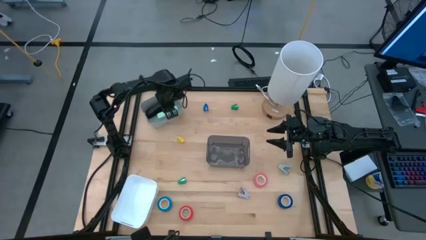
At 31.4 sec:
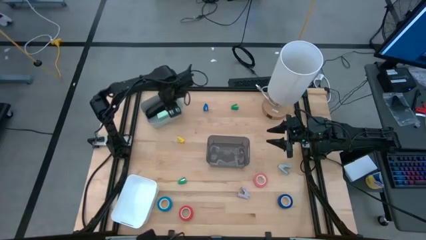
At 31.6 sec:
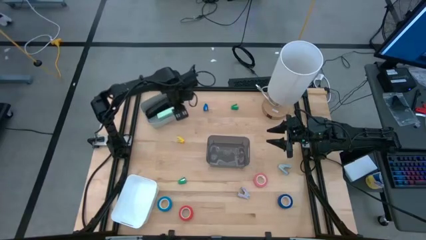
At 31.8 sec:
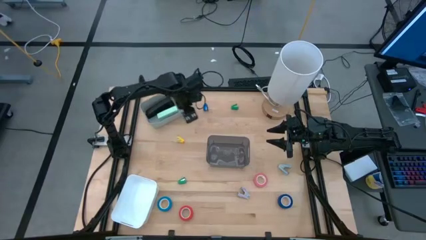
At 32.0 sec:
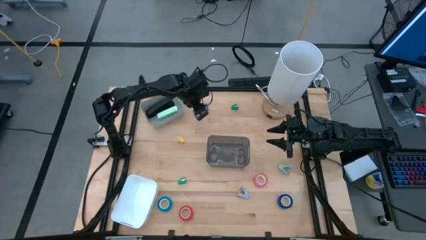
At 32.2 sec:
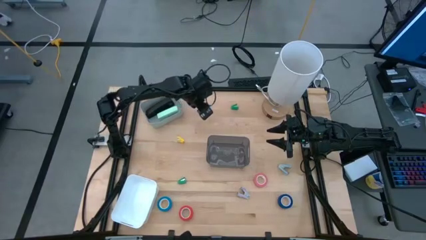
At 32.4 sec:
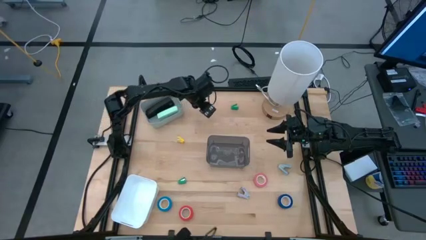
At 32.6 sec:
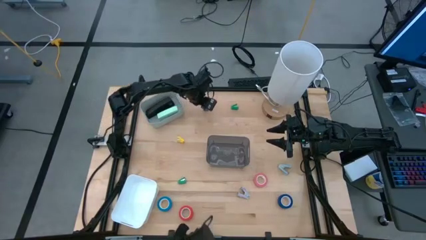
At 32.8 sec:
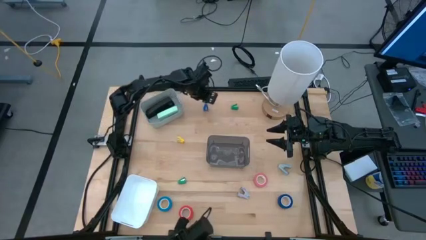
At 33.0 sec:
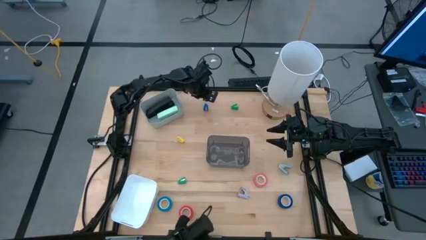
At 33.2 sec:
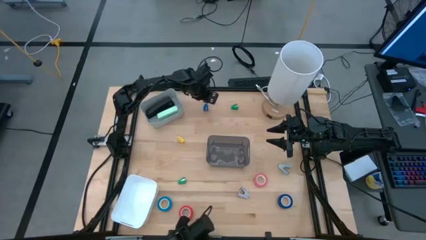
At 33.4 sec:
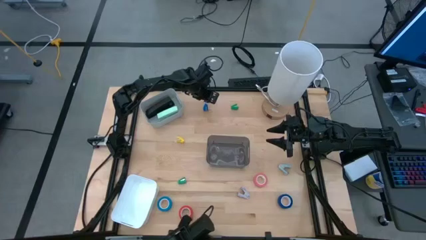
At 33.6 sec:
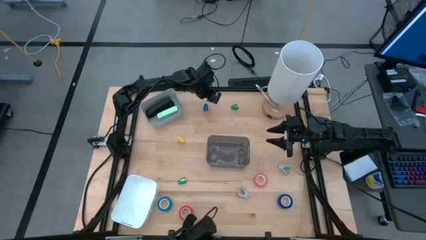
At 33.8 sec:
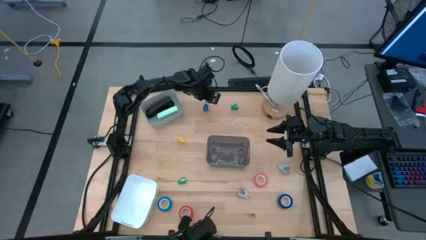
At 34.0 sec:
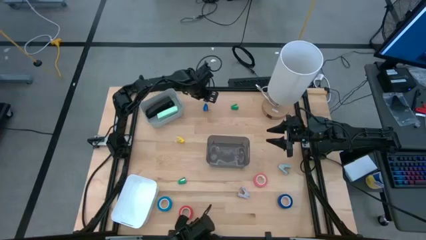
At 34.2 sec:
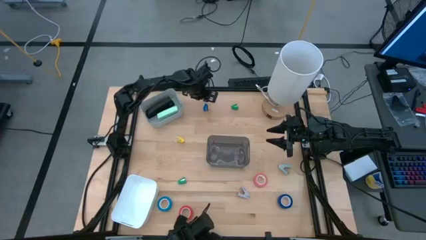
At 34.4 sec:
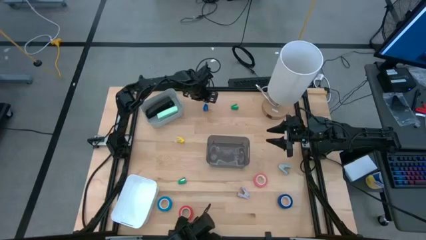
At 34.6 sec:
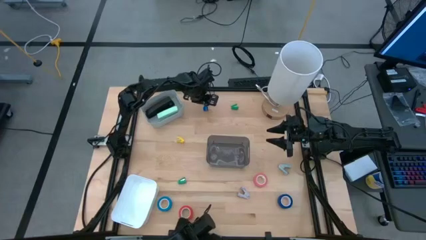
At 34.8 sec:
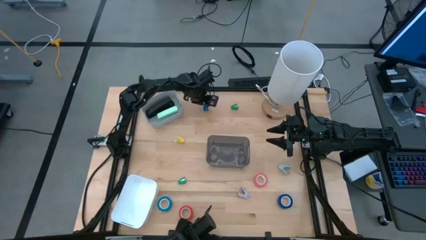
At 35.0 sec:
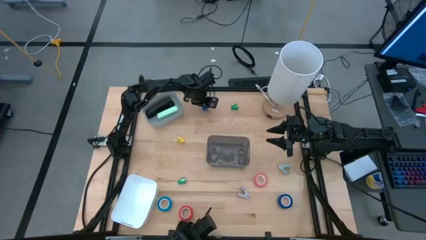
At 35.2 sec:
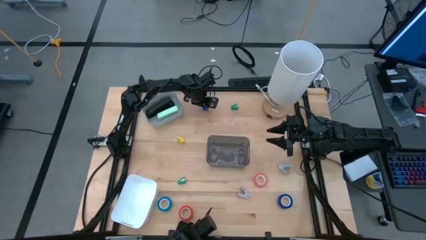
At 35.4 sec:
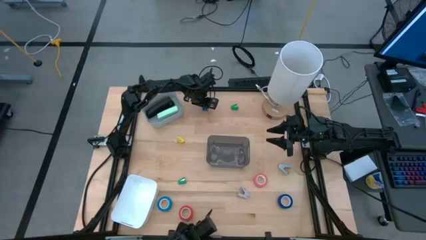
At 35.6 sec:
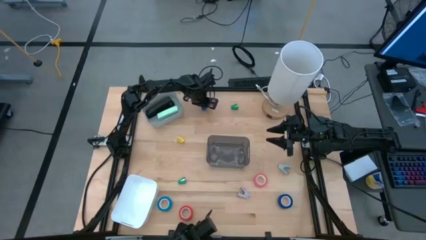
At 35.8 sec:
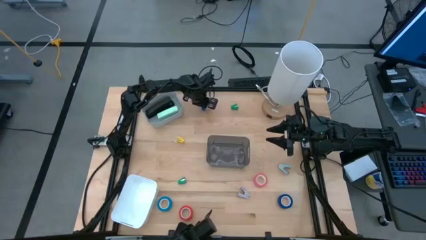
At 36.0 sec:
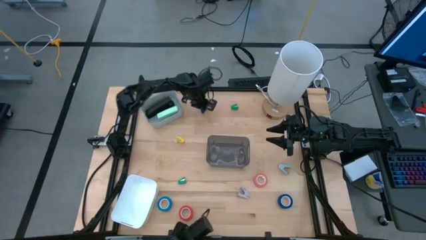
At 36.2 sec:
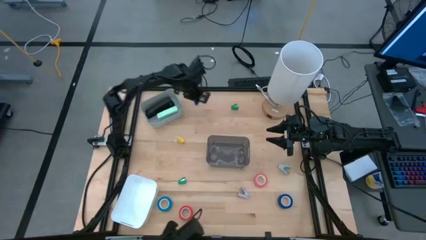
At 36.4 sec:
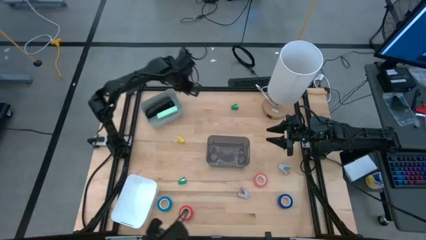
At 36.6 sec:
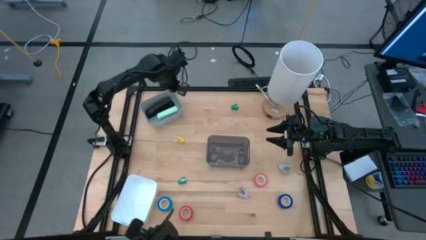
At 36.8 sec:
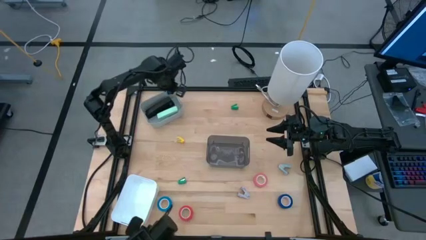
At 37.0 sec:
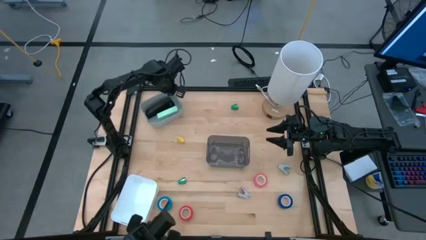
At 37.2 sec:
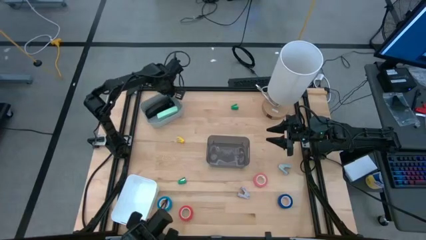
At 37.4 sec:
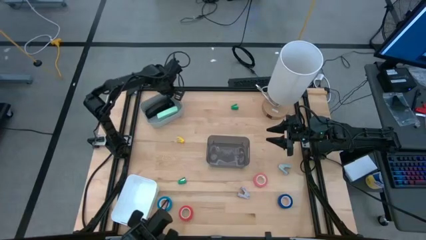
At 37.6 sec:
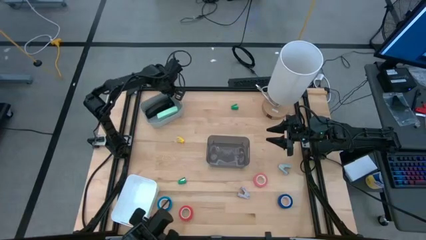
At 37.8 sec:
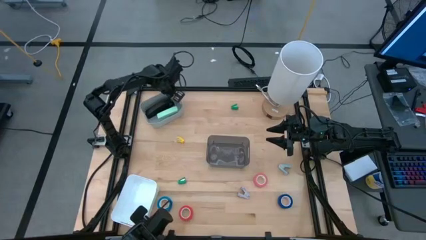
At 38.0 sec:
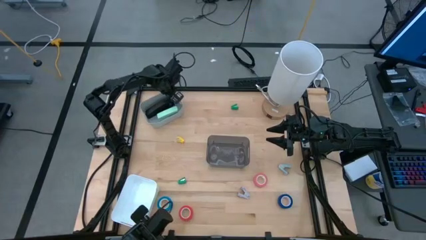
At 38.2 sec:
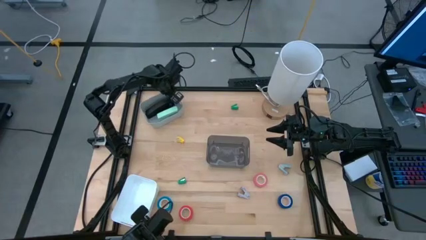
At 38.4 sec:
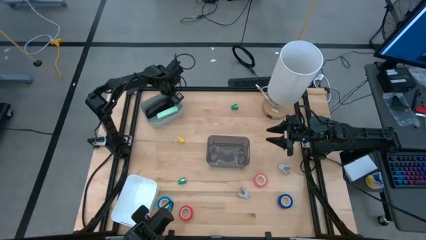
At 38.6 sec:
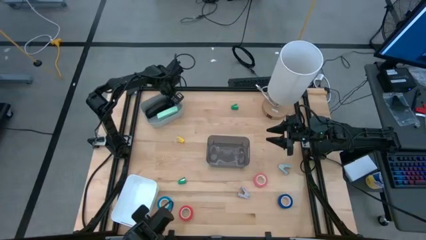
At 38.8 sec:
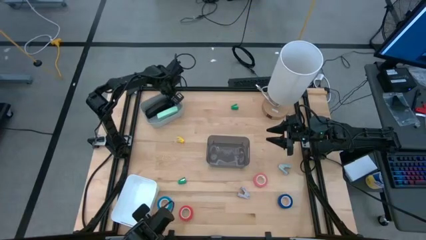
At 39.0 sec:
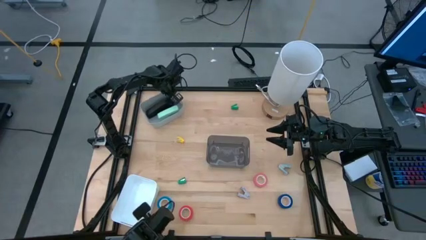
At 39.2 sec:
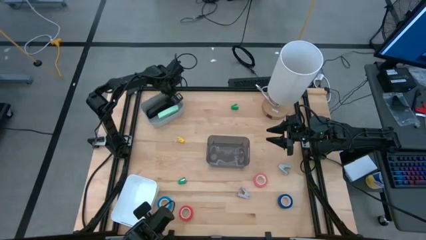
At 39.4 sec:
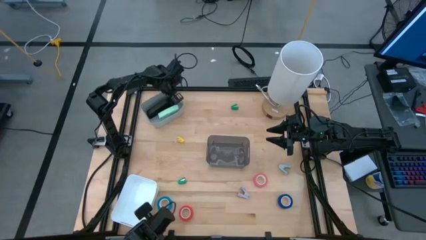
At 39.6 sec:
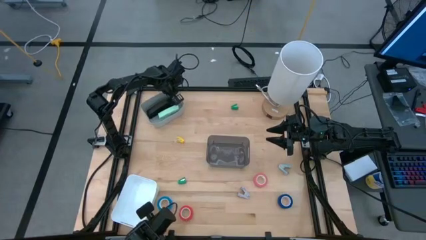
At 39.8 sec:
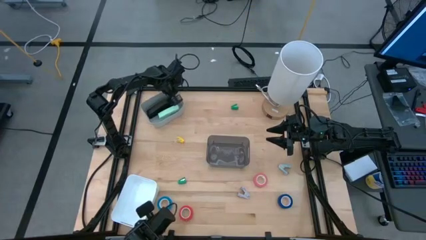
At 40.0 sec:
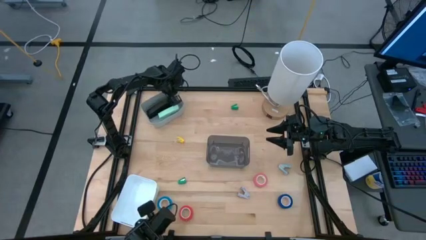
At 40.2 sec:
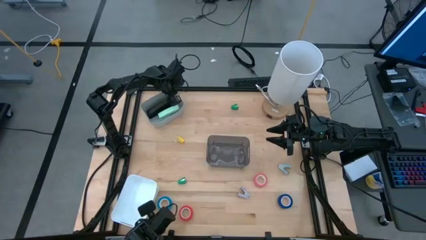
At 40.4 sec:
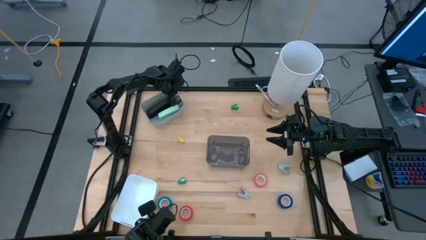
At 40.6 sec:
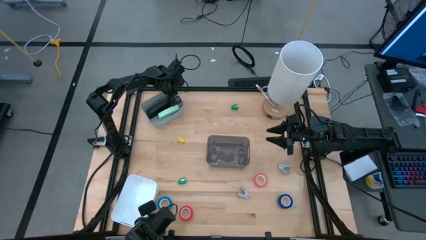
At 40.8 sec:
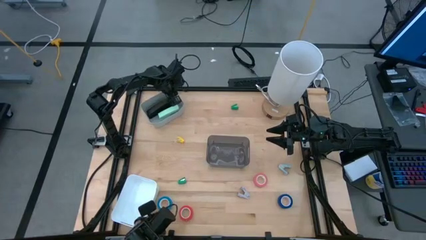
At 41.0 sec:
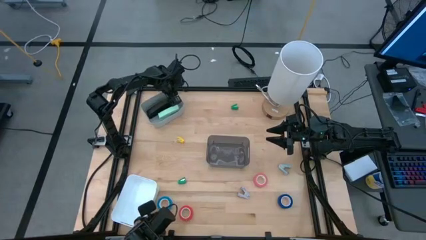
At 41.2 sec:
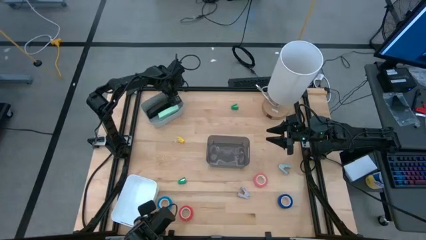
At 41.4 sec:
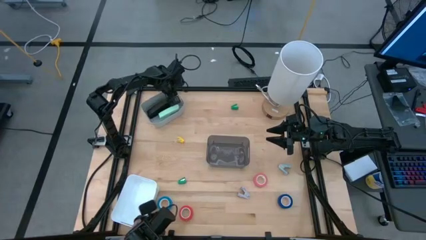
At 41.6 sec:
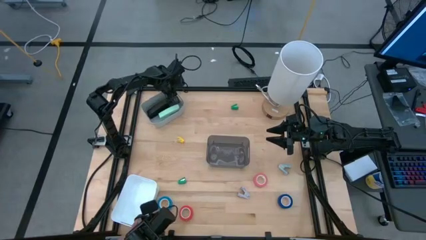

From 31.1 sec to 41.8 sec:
Task: Pick and place Stapler, Stapler remover, tape
Put the blue stapler into the gray bin

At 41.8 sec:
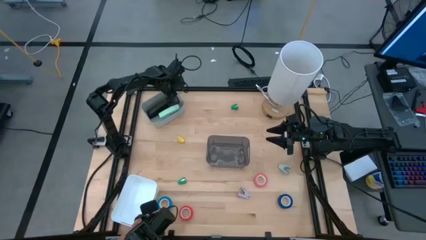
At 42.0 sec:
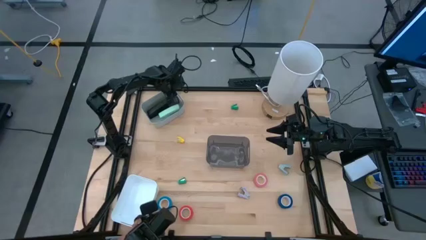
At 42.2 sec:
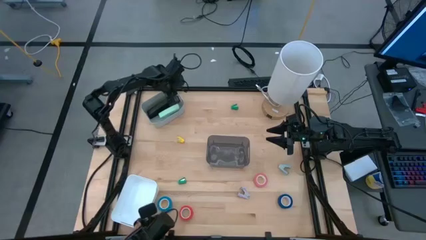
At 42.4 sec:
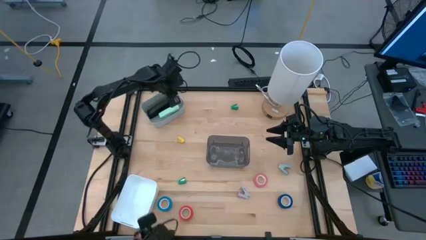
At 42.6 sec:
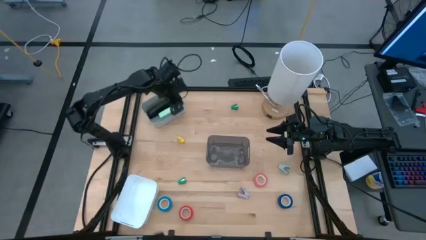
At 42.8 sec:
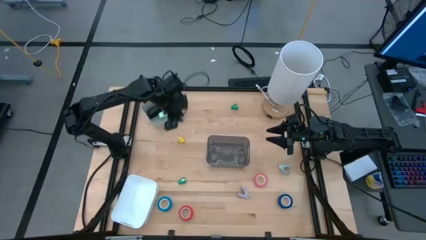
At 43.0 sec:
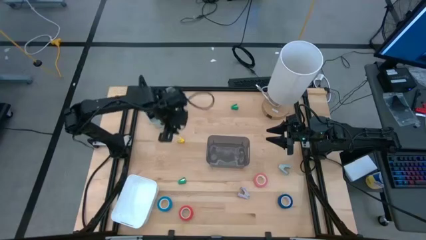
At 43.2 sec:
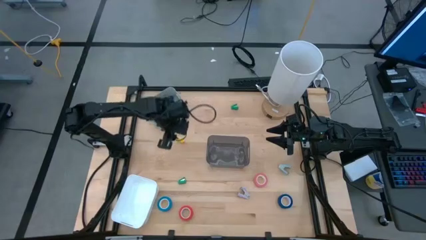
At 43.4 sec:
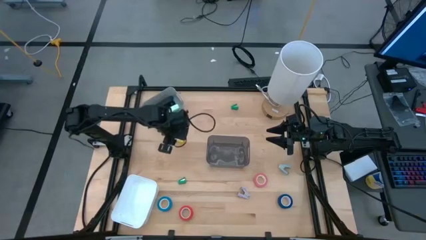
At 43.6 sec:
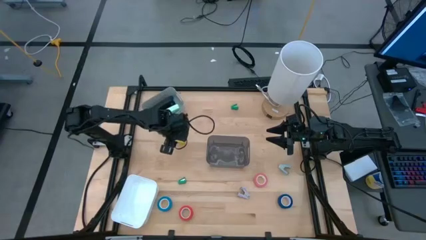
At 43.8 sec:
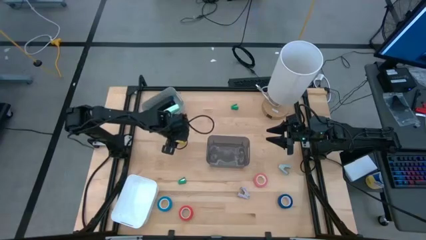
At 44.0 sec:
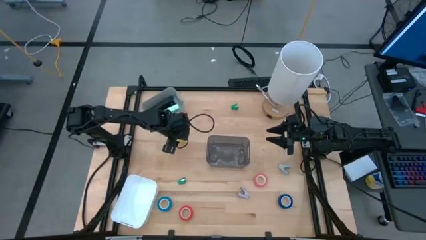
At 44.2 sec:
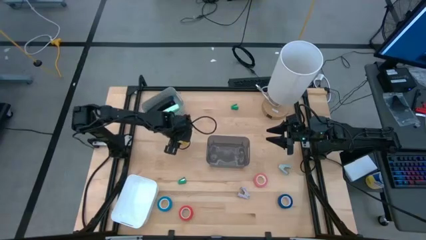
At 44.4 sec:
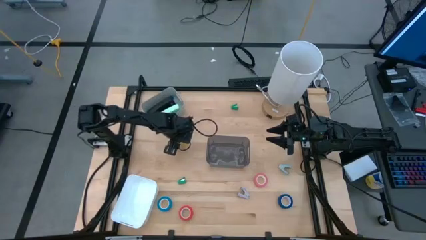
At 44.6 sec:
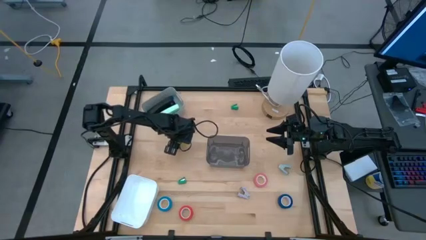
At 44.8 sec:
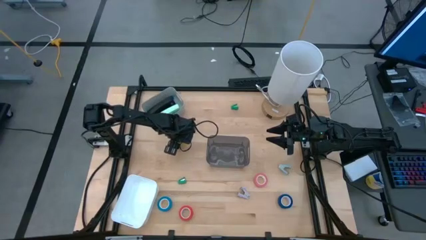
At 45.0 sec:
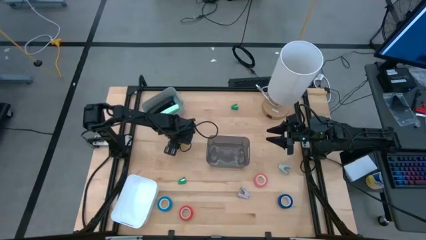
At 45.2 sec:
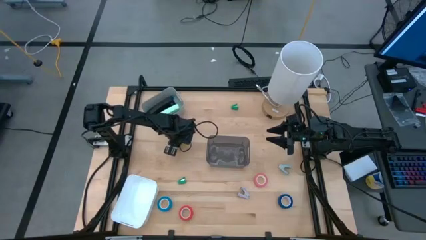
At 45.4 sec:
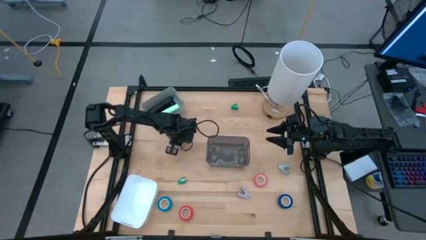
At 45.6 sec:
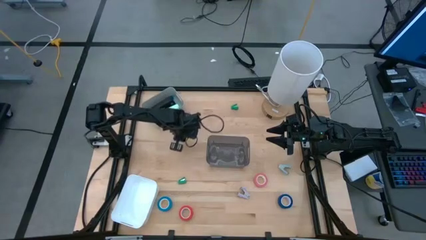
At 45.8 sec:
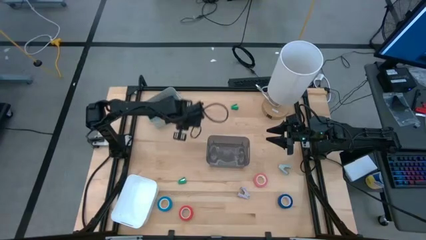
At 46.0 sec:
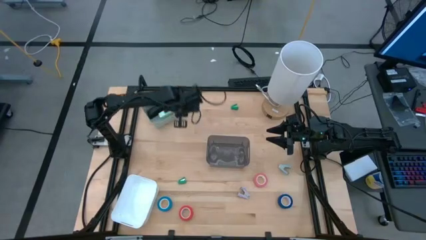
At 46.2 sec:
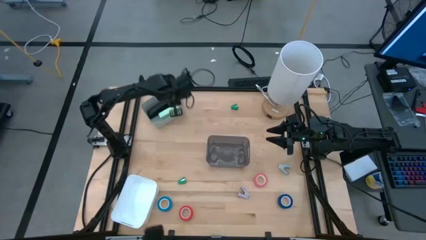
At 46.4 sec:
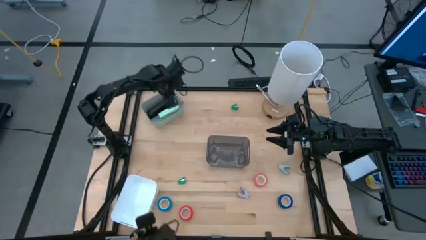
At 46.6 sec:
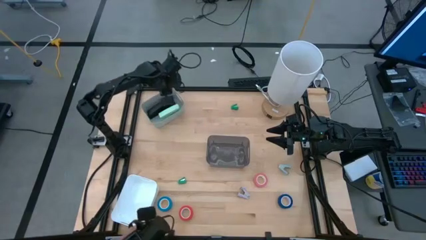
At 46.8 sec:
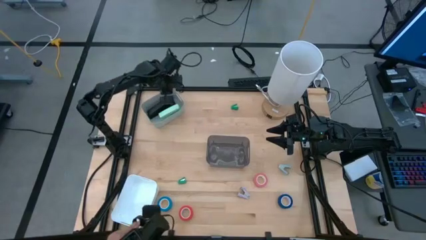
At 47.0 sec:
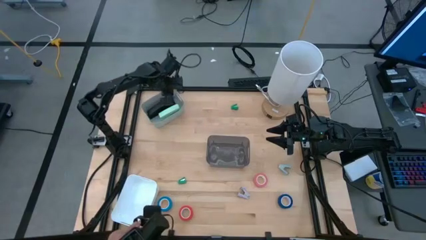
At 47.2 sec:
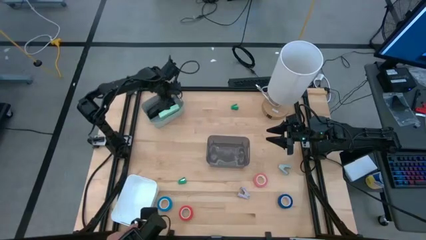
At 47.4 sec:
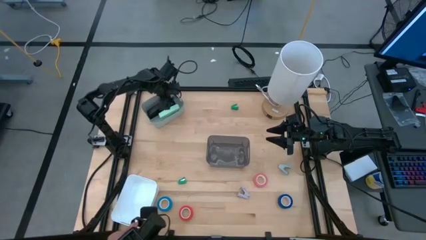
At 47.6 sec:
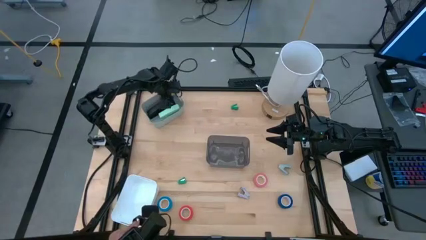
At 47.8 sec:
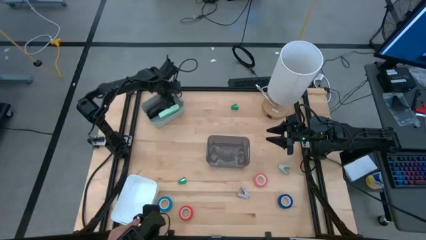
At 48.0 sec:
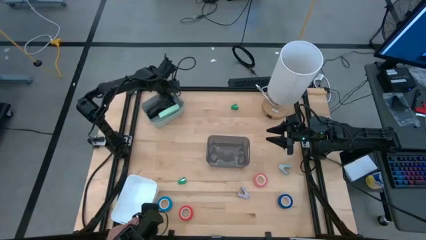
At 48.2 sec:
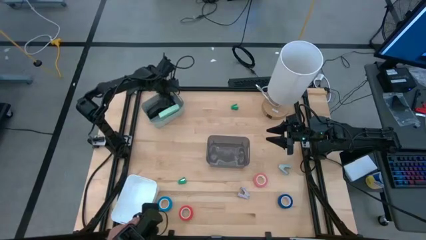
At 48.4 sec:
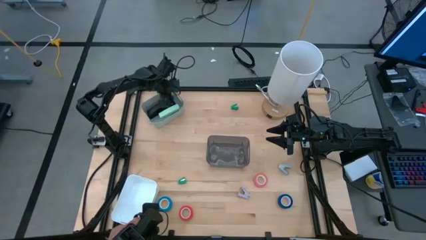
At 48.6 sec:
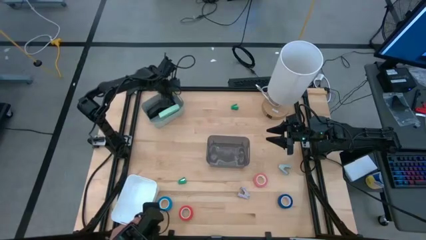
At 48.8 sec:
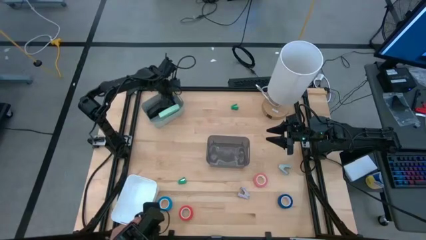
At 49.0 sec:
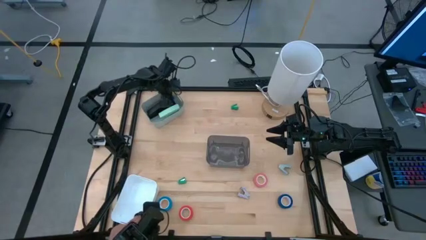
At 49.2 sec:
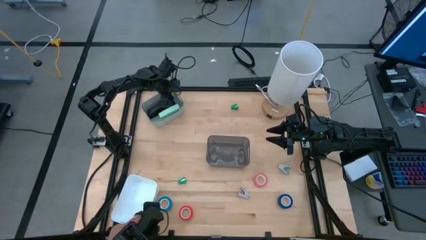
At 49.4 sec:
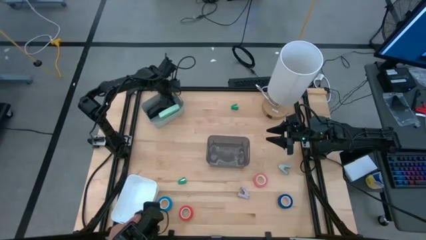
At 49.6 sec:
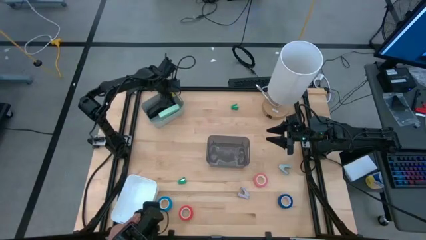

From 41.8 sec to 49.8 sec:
Put the yellow stapler into the gray bin
